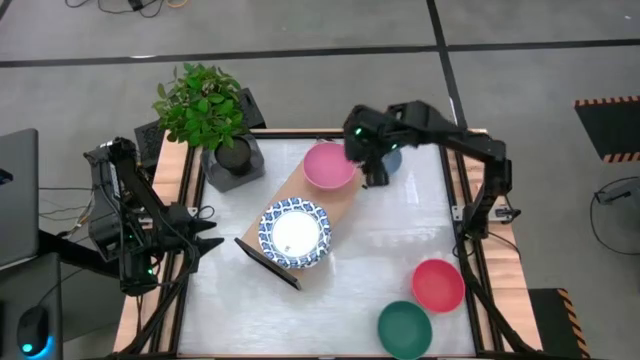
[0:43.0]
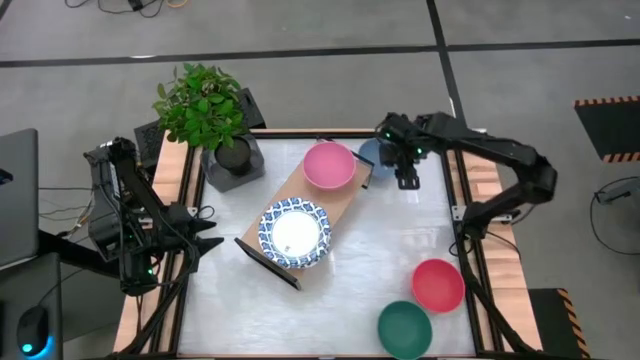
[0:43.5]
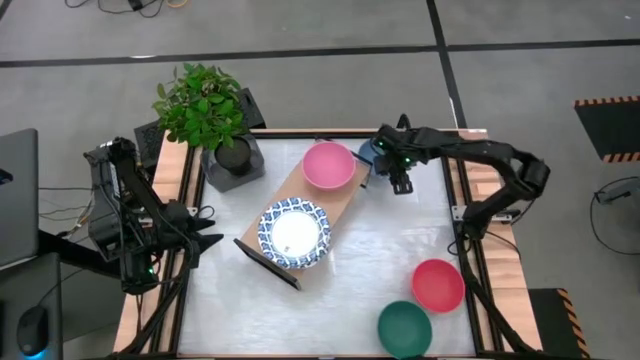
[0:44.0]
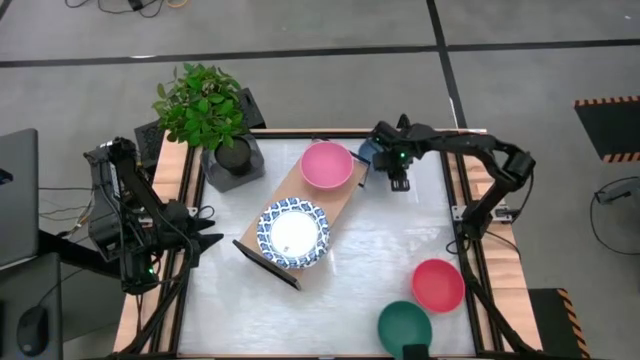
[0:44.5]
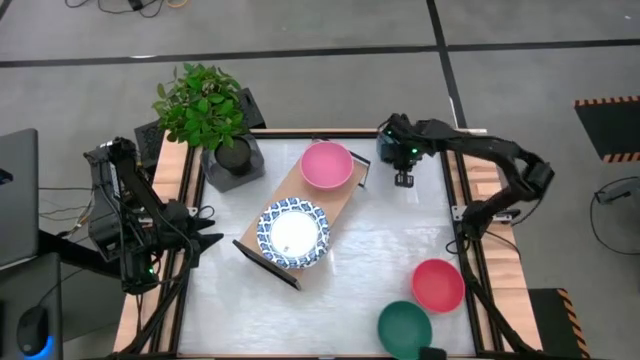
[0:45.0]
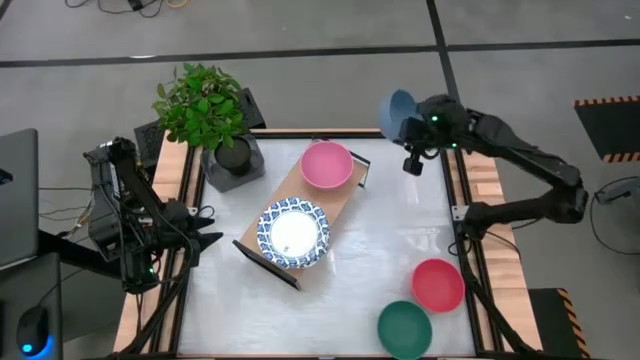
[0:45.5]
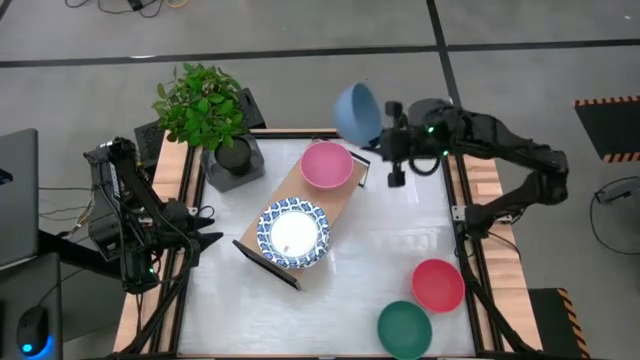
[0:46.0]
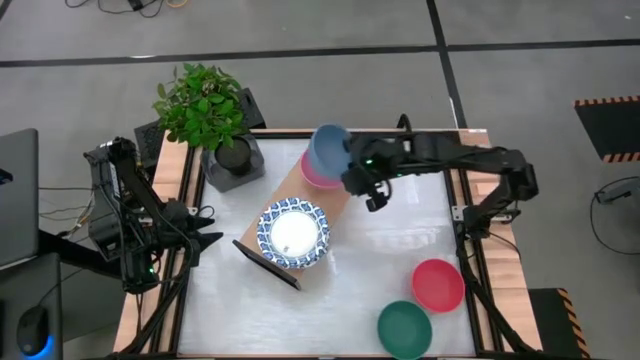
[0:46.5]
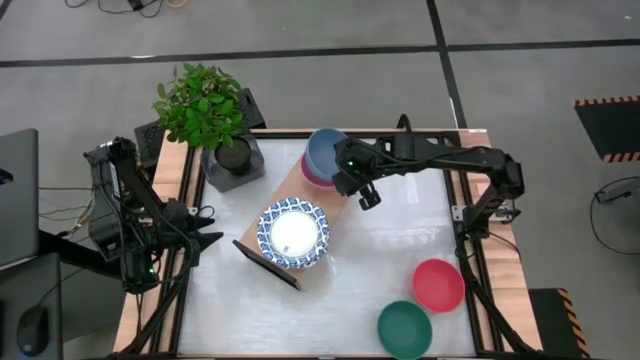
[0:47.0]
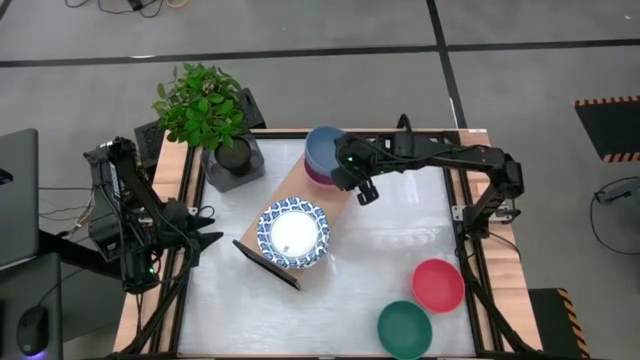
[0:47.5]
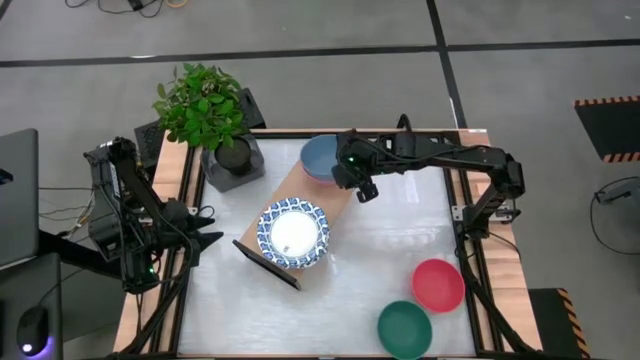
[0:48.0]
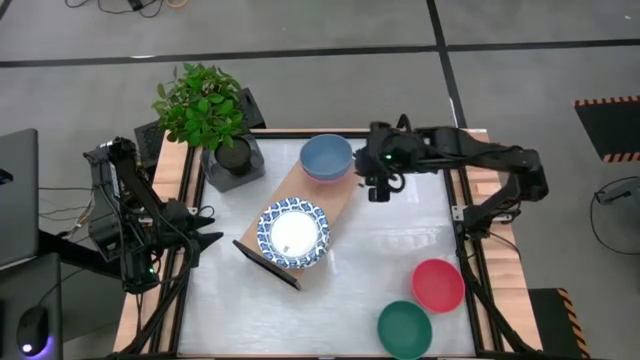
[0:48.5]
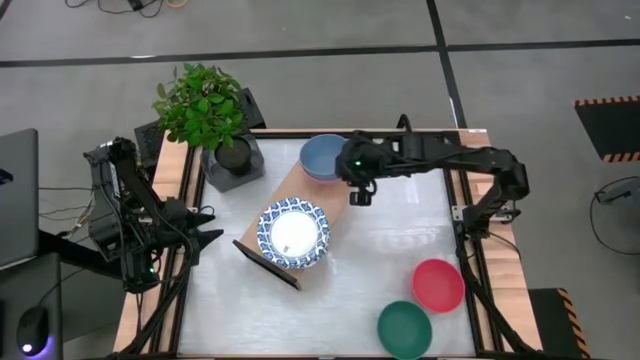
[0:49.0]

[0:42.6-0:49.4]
Task: Place and stack bowls onto a shelf
Stack the blue bowl on the pink bowl on the shelf

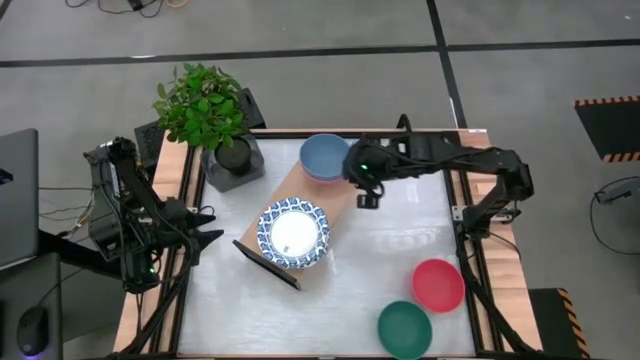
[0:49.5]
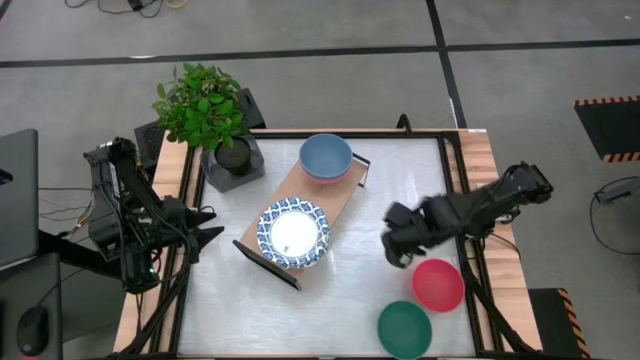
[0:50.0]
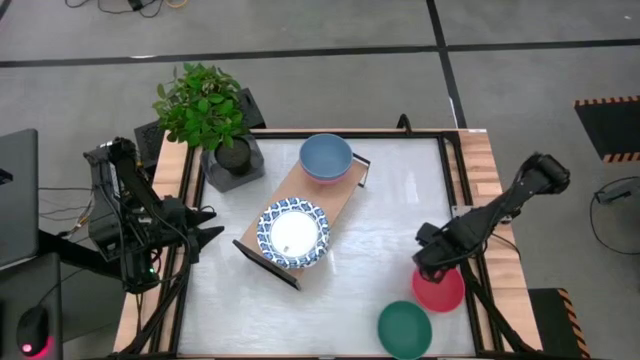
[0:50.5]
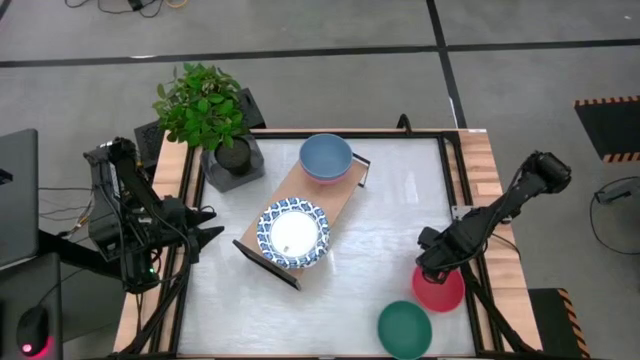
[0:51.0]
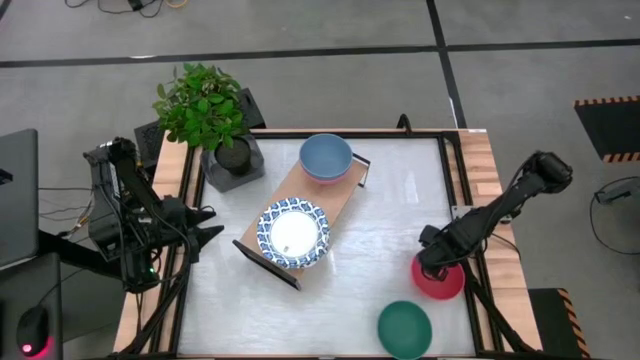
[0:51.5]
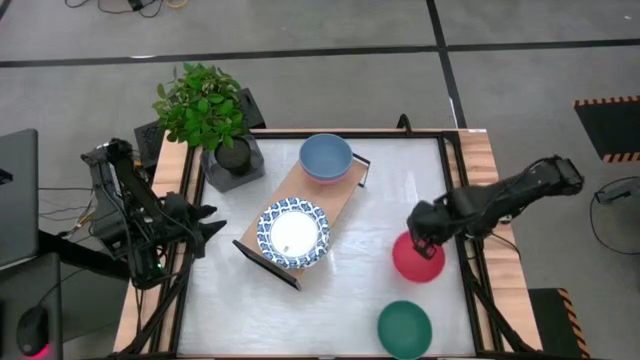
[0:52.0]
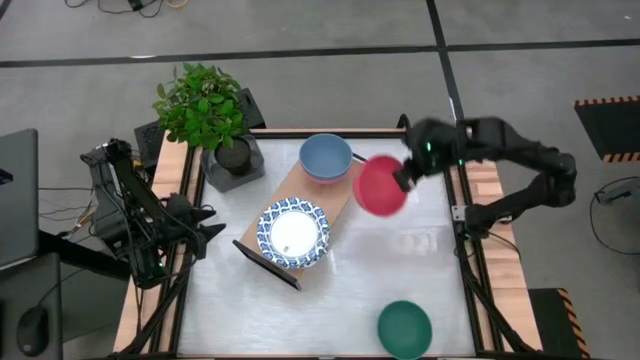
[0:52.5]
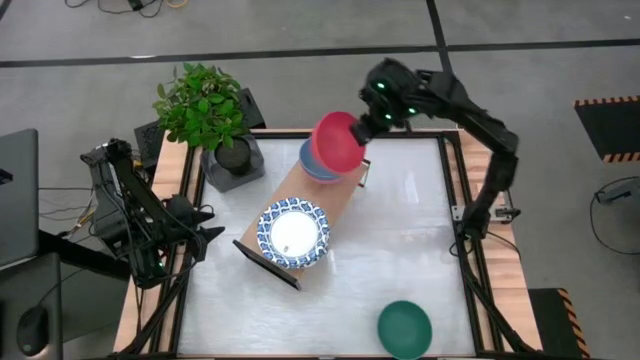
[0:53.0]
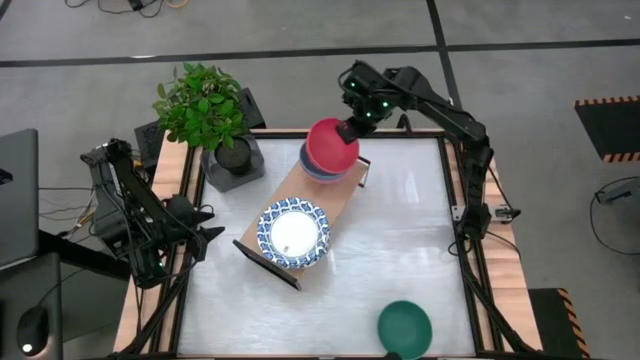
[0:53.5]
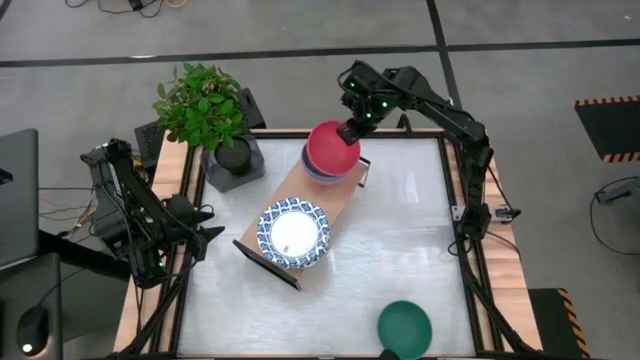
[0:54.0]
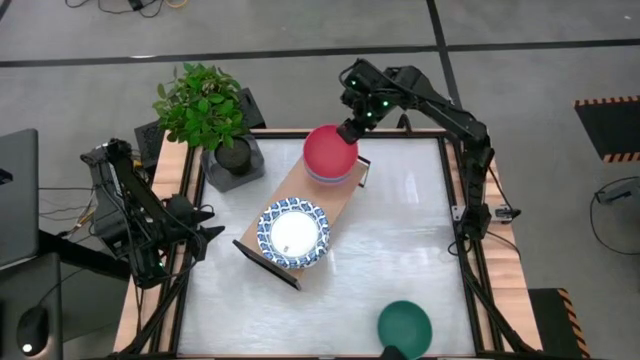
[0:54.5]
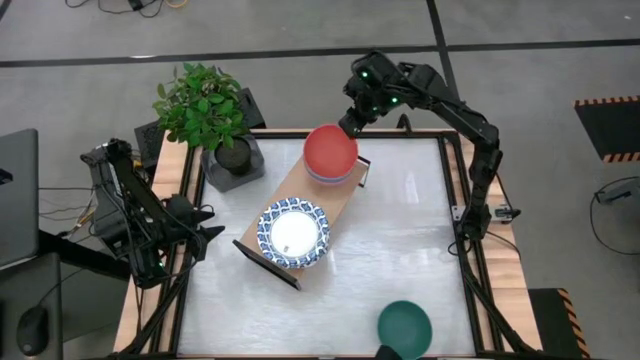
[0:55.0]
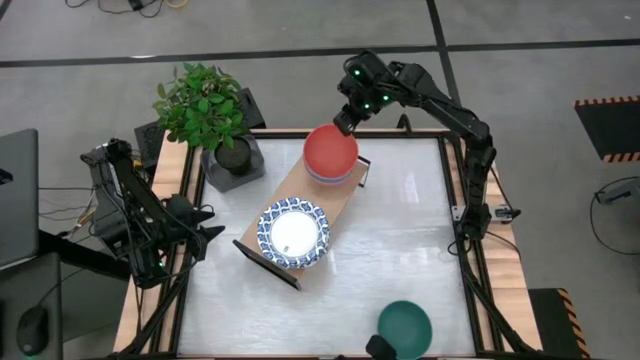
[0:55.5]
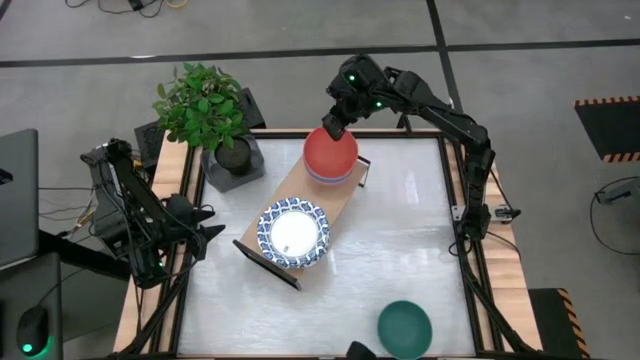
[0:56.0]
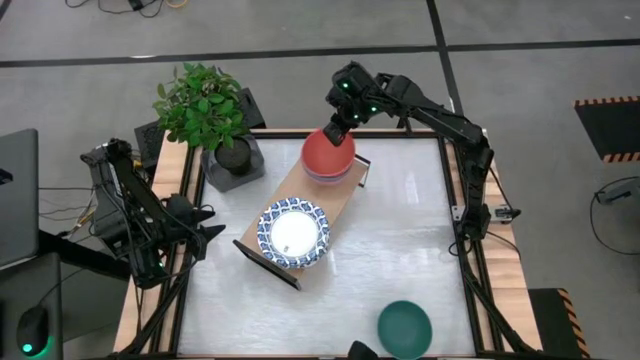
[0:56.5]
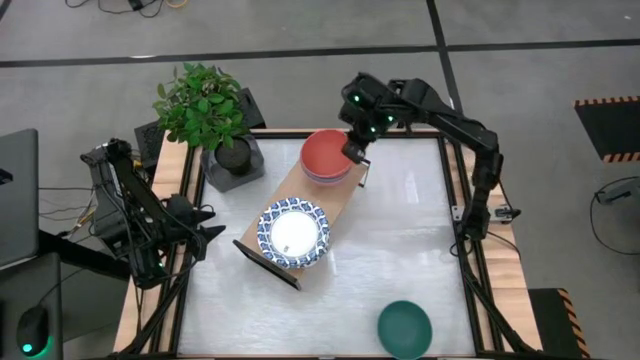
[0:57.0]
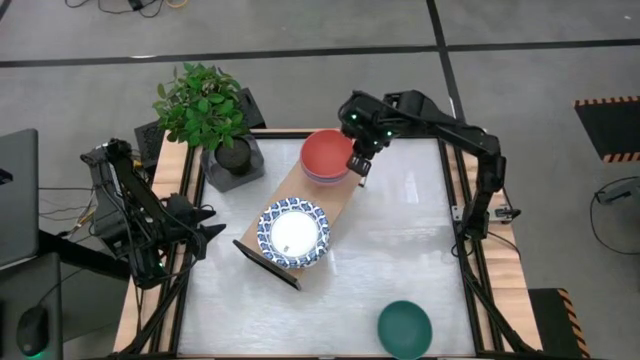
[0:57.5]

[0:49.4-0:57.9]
Stack the orange bowl on the blue bowl on the shelf

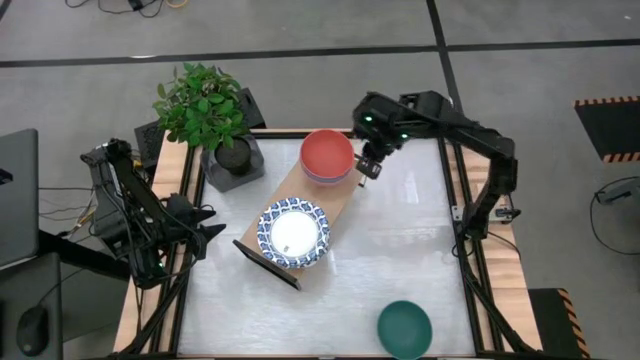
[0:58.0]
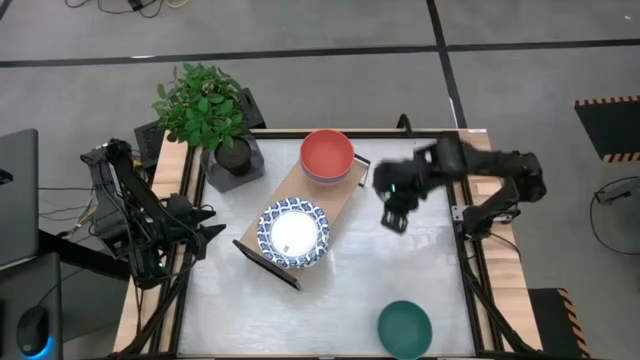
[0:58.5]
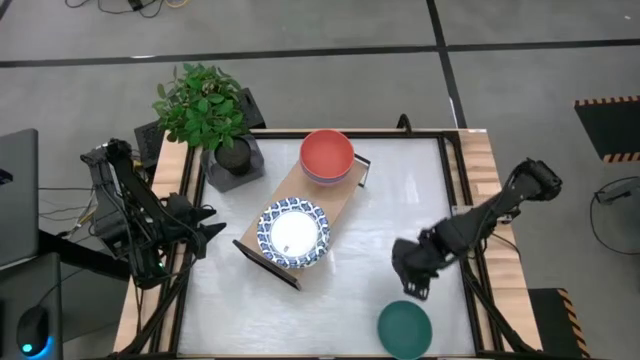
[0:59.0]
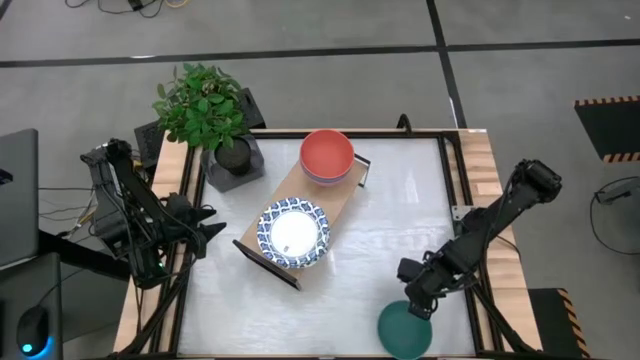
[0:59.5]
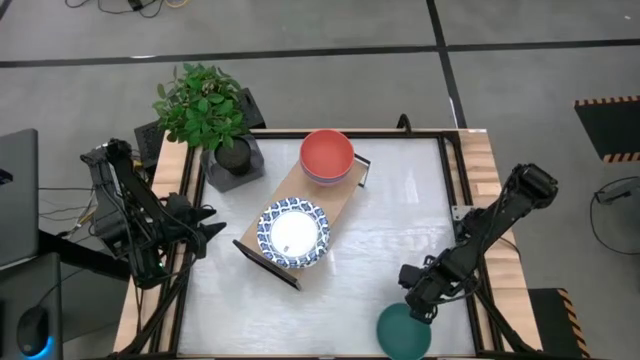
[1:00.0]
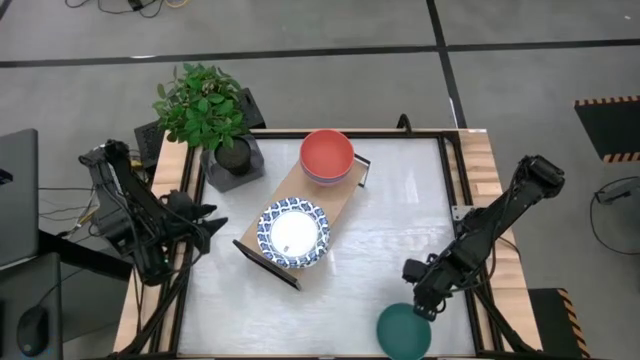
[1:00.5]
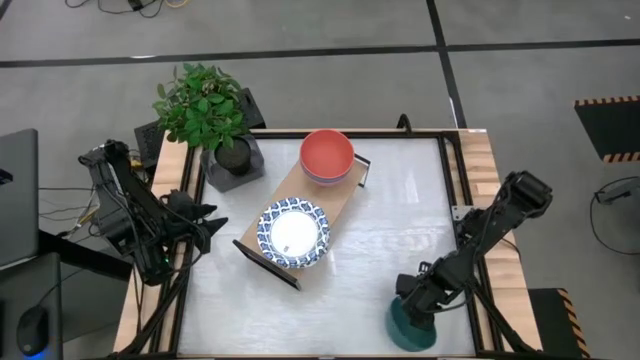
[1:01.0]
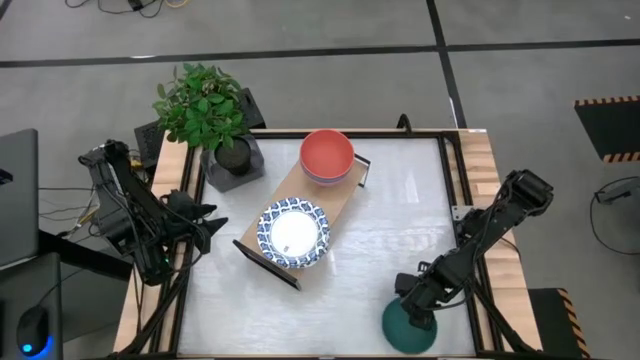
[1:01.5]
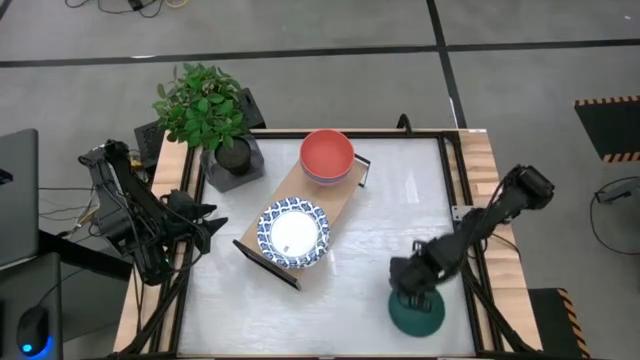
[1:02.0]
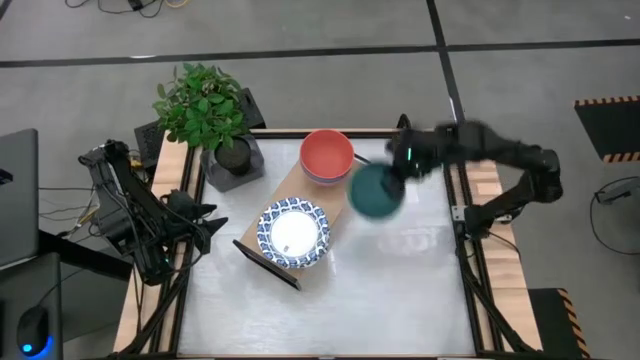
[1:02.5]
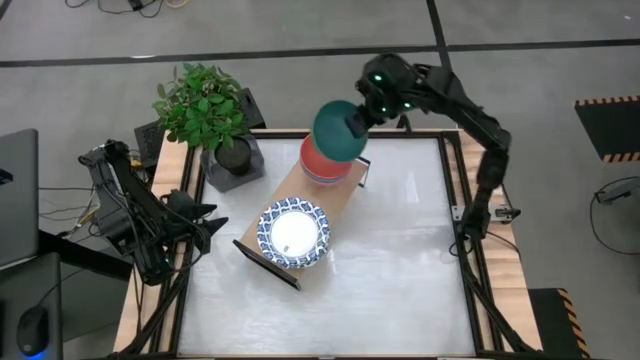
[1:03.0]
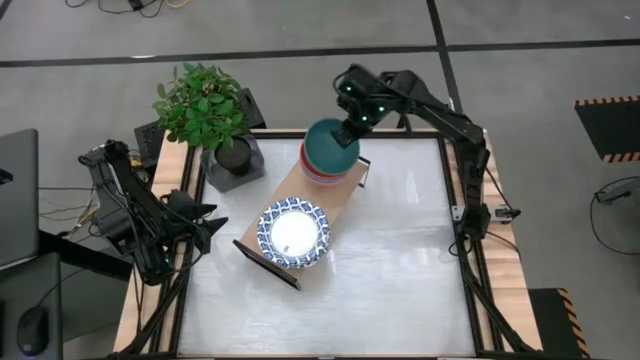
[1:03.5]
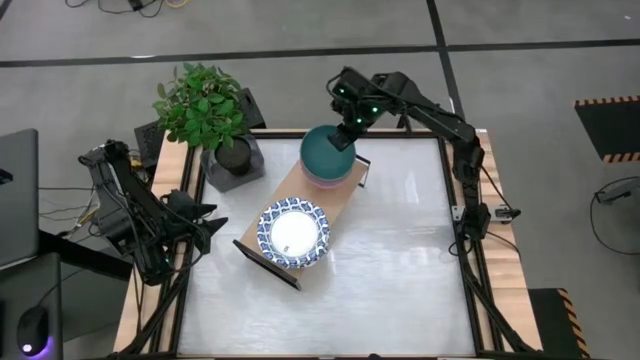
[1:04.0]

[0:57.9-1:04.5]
Stack the green bowl on the orange bowl on the shelf
